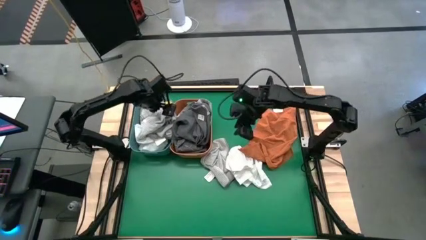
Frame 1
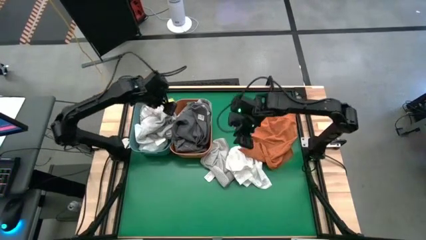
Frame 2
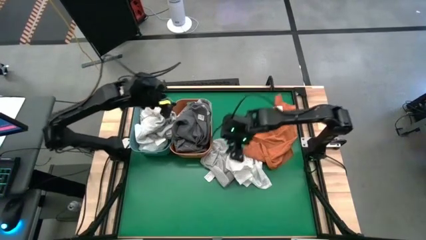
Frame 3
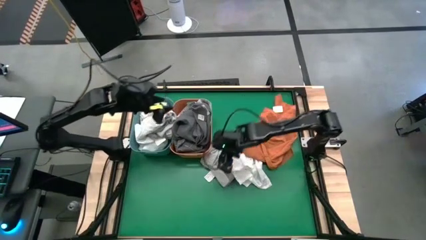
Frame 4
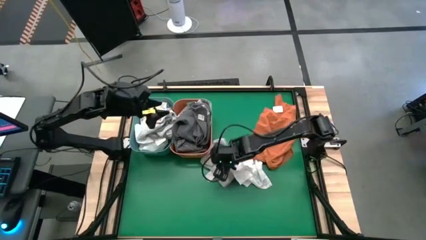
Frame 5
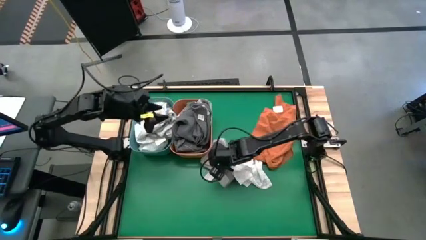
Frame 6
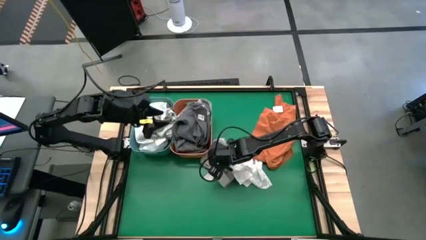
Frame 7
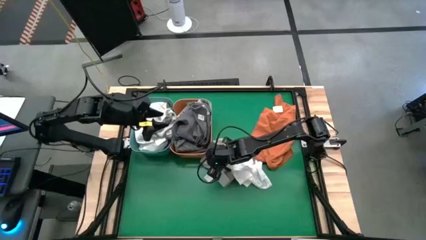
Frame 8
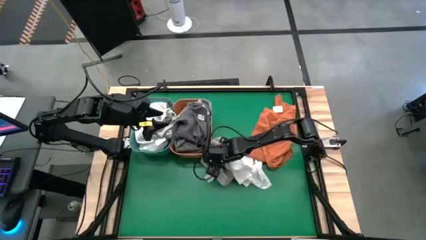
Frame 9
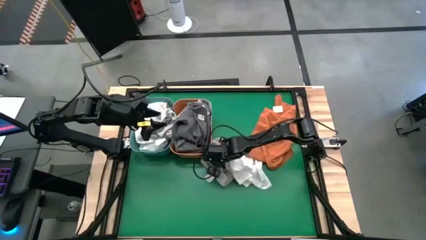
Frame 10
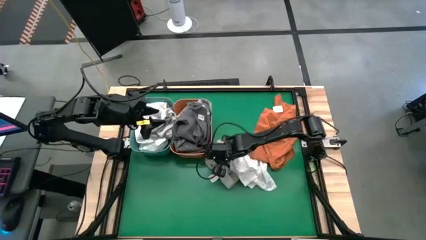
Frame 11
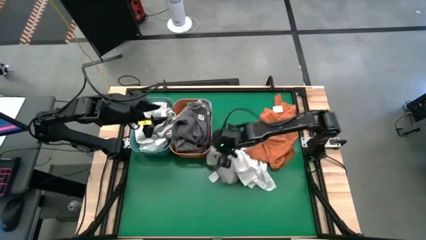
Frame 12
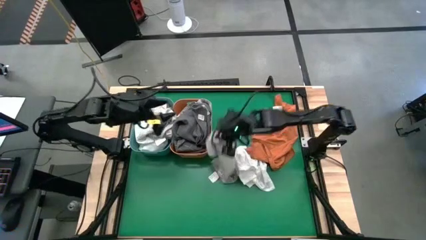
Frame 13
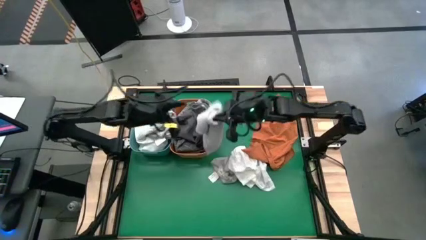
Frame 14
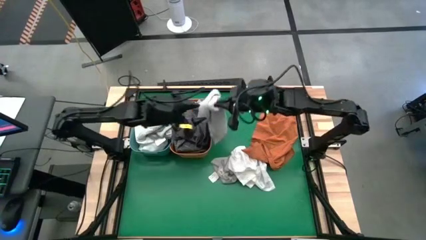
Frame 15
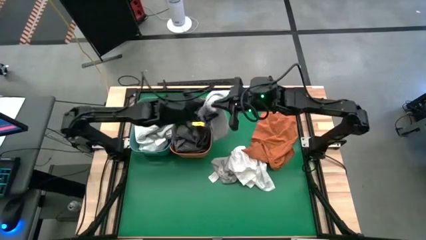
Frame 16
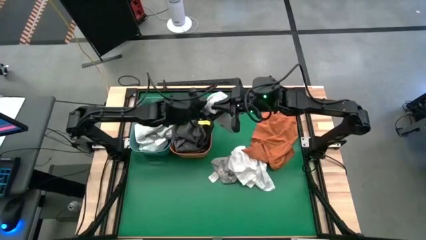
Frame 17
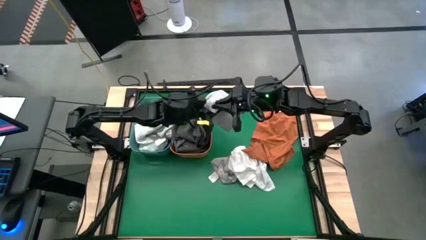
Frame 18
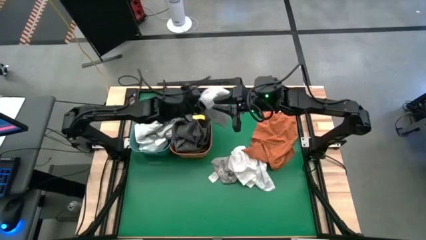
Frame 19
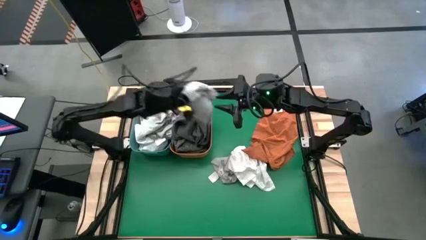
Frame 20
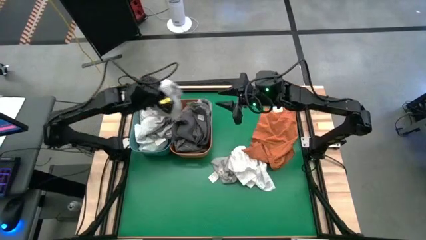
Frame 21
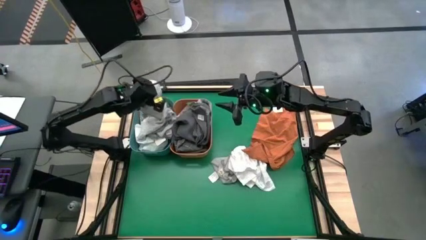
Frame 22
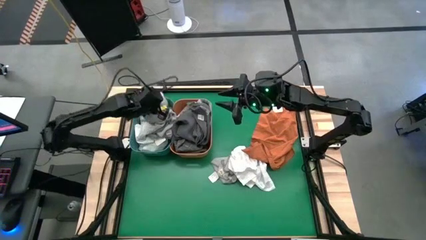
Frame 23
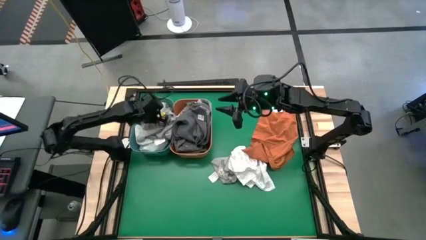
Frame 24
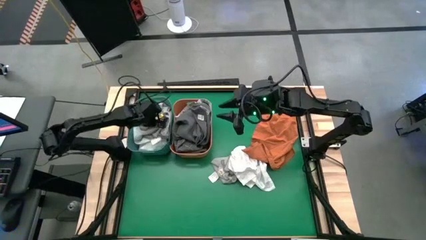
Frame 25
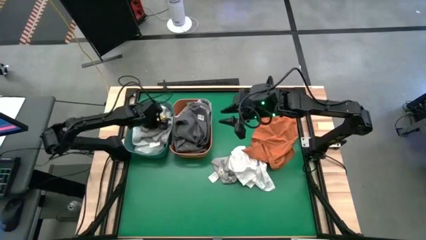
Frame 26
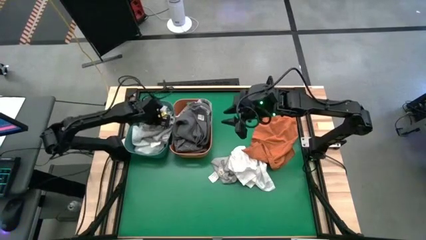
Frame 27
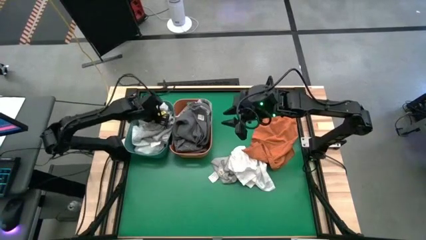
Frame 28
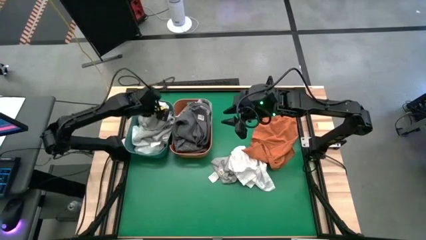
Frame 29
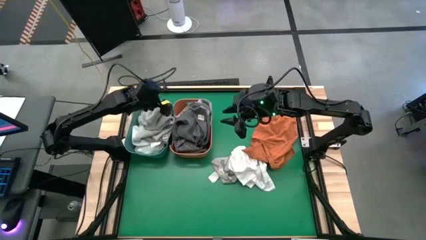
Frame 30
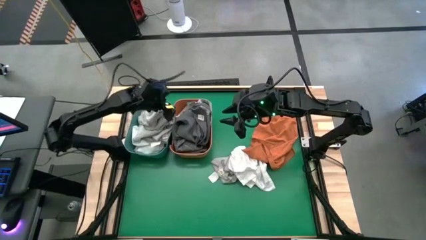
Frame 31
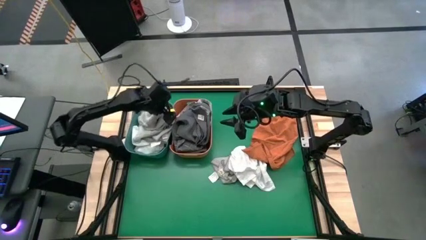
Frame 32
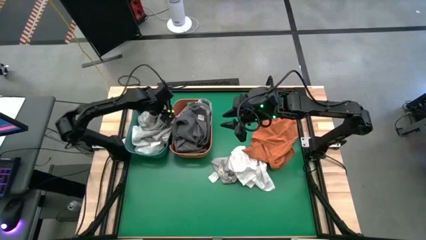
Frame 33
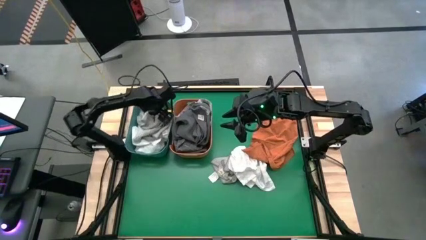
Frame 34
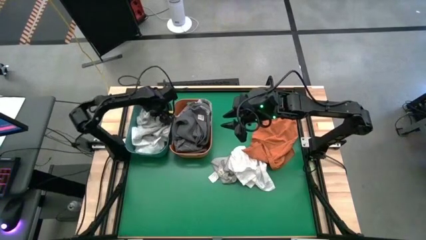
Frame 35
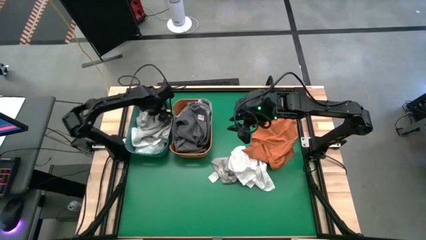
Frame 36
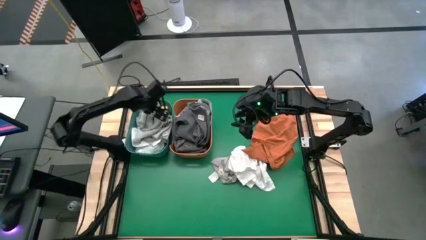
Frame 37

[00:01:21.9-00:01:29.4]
Task: Sort towels by color in basket
Put the light gray towel into the blue bin

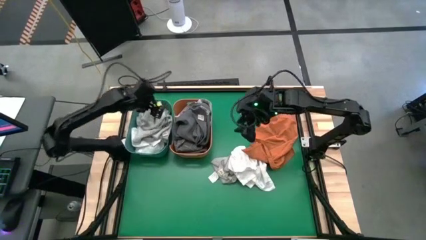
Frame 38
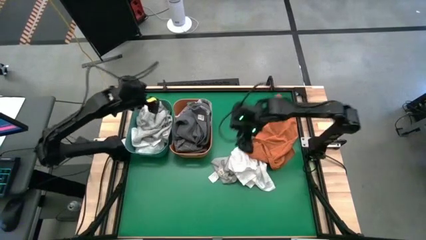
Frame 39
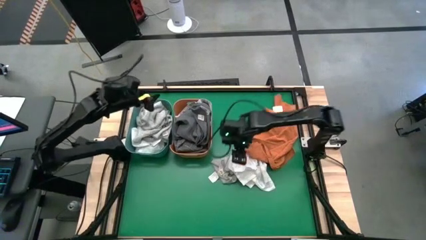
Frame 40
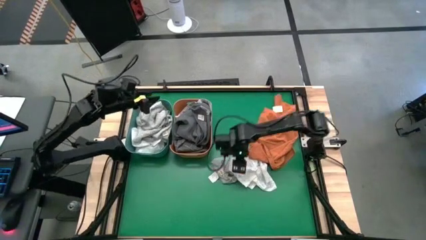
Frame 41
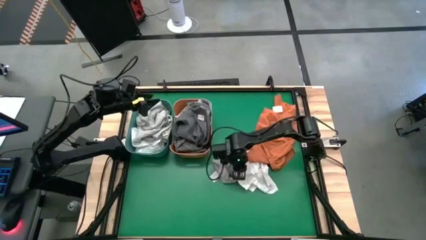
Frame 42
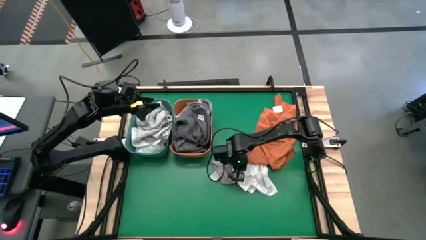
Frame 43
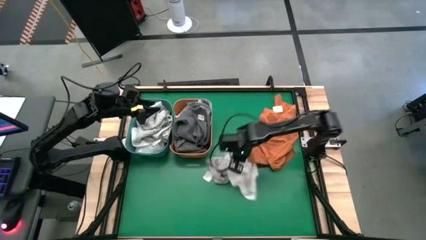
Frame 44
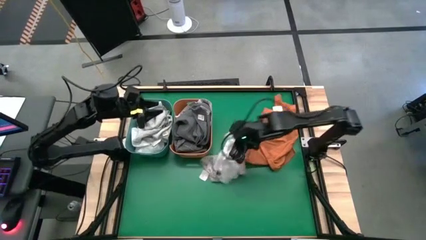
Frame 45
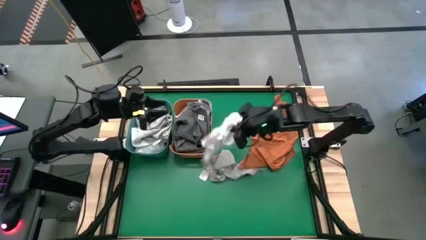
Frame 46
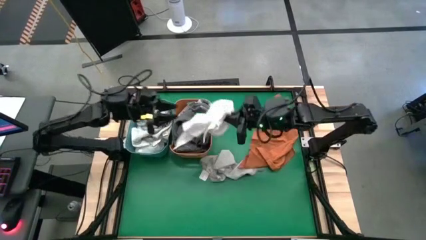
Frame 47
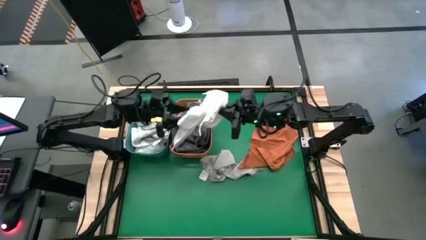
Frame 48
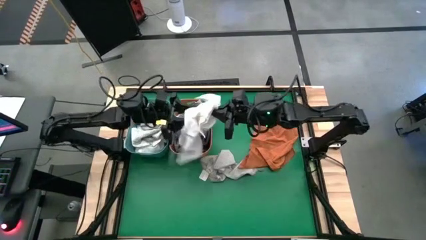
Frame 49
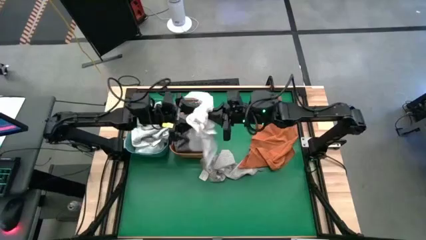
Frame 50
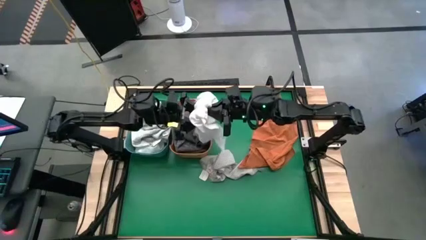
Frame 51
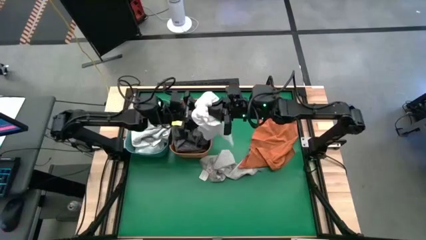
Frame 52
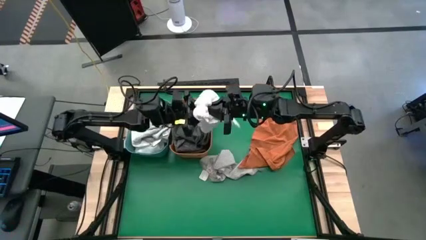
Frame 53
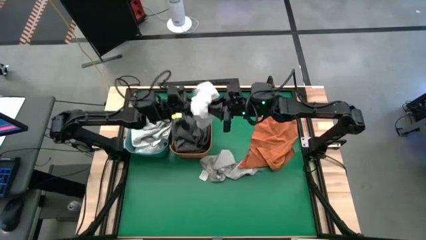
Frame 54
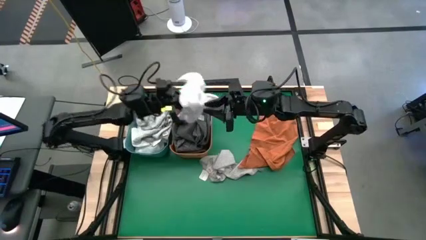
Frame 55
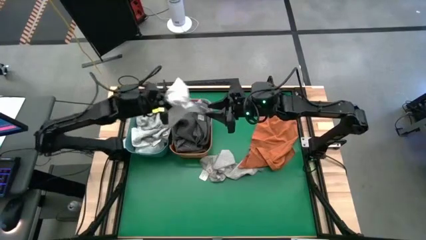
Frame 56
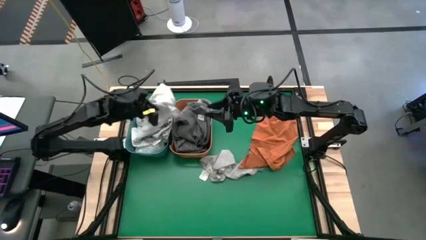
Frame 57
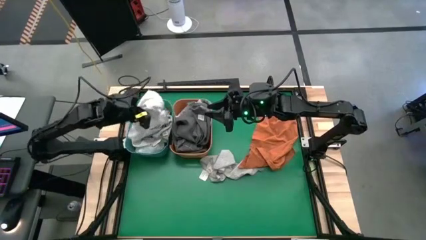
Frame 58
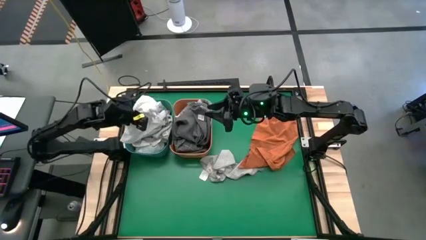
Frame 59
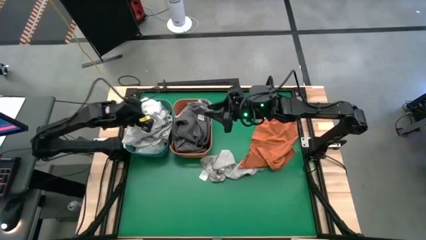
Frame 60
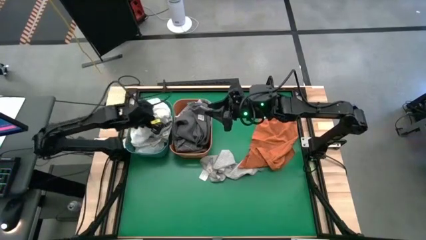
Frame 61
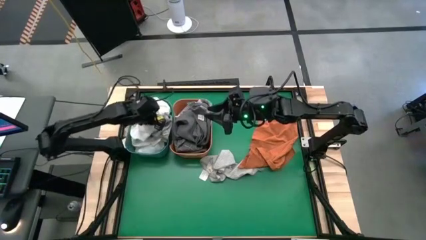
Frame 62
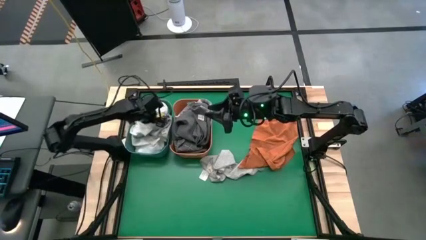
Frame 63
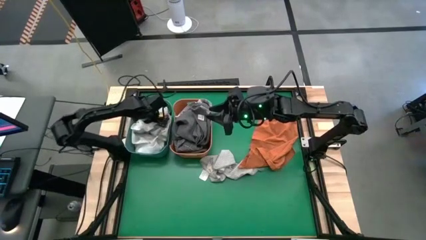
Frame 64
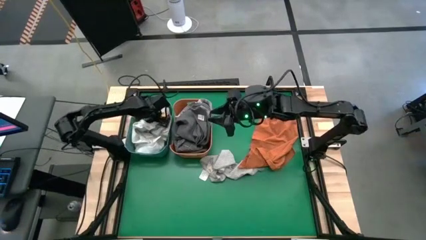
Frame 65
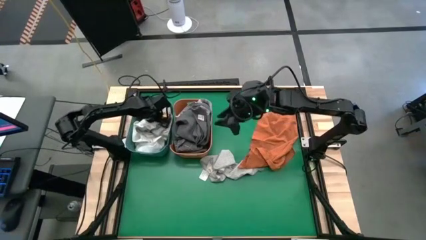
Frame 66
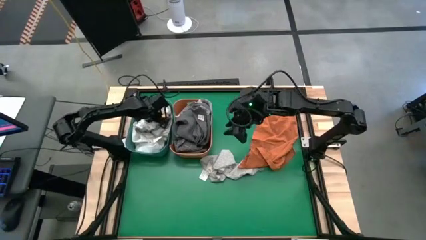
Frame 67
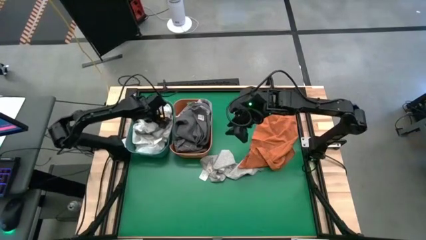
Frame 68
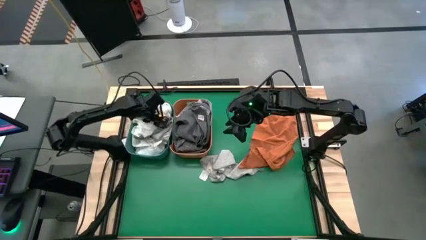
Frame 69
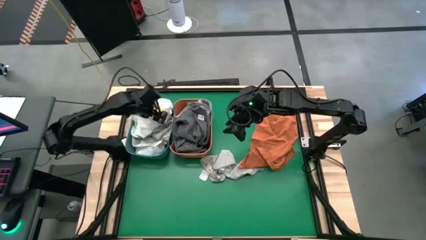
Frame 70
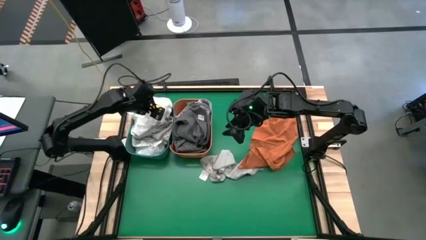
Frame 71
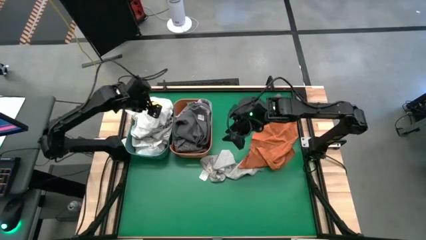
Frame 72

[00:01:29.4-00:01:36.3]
Put the white towel into the blue bin

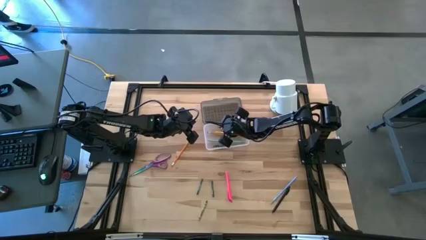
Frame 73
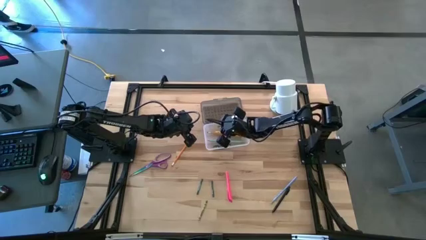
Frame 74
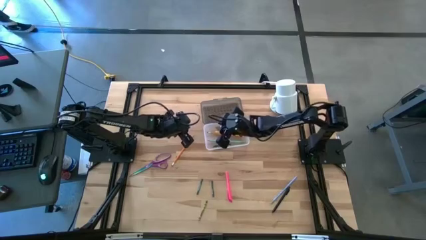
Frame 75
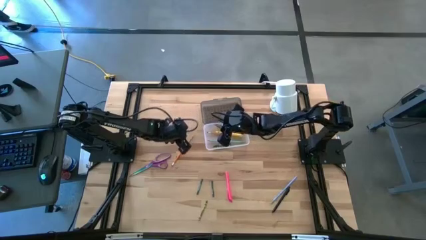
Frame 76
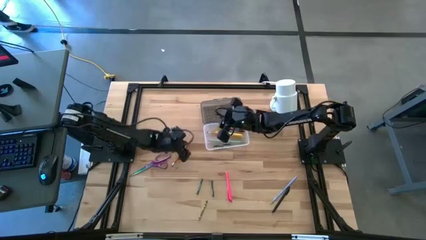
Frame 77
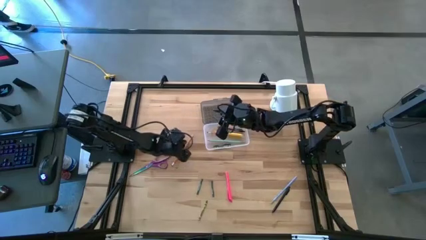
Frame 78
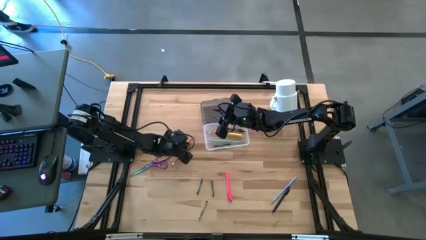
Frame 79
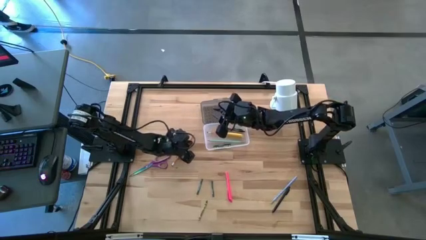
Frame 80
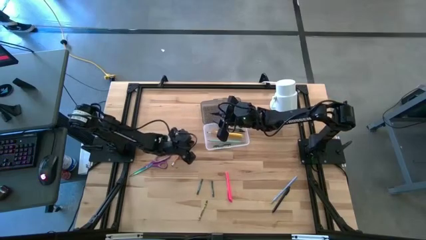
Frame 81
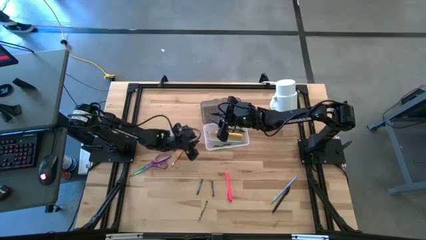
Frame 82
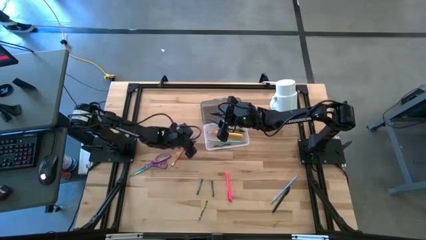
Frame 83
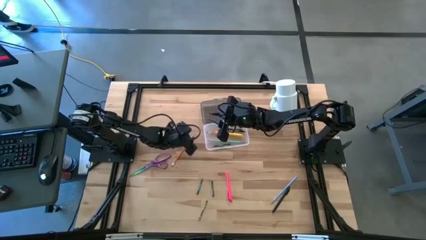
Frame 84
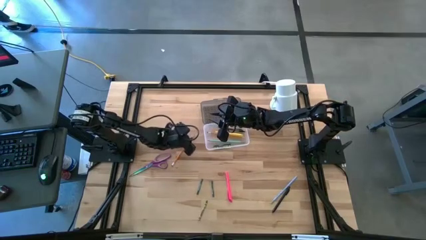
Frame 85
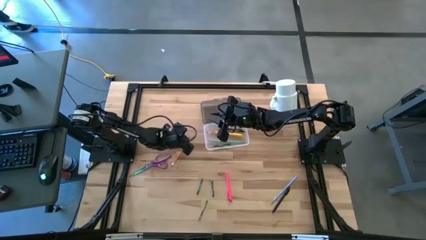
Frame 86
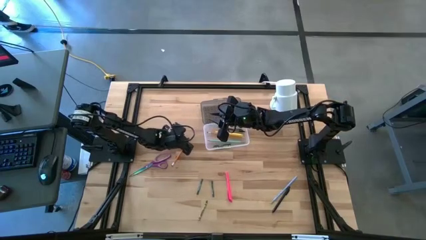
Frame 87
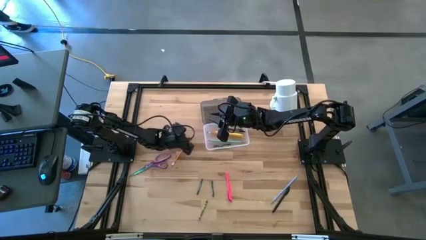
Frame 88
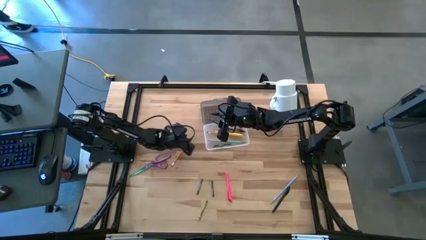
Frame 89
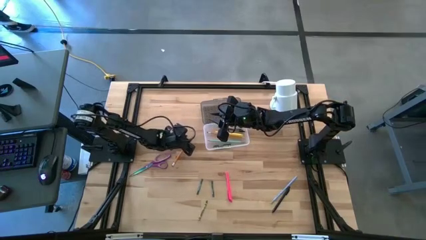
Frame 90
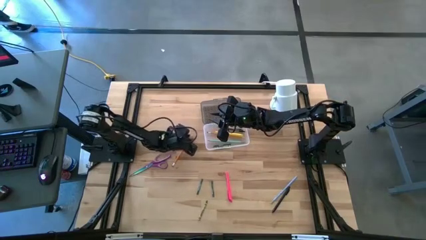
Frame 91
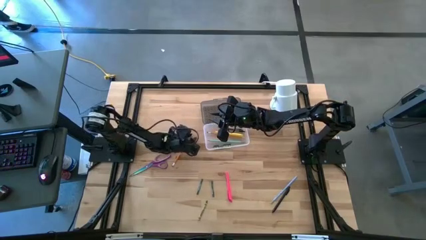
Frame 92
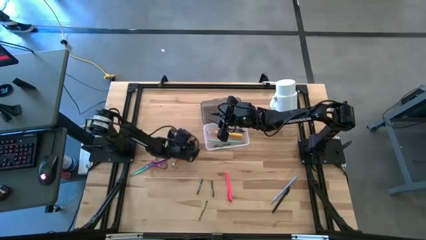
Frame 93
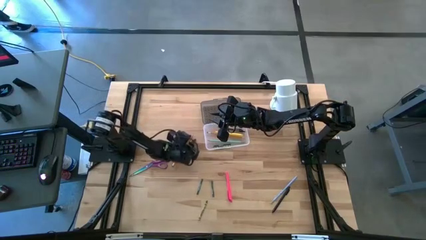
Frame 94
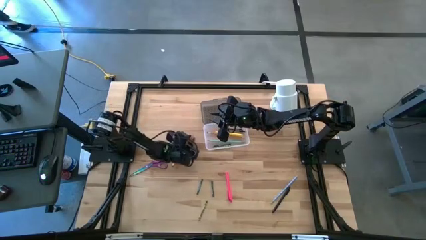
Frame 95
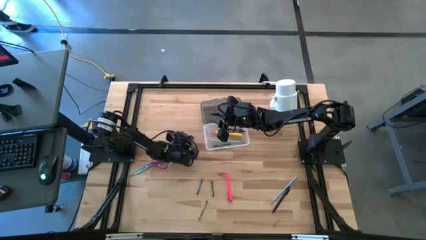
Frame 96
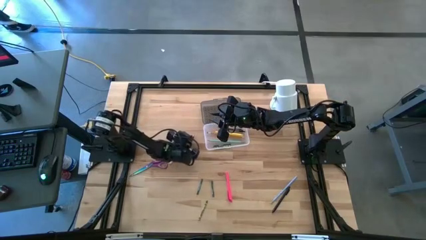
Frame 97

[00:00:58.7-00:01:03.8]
Task: Pick & place school supplies into a supply box
Put the orange pencil into the gray supply box
